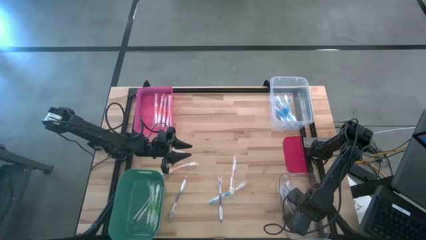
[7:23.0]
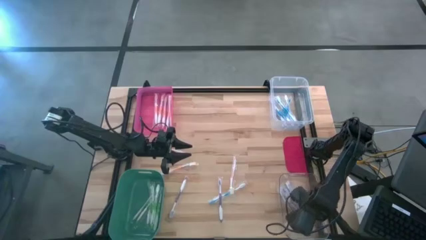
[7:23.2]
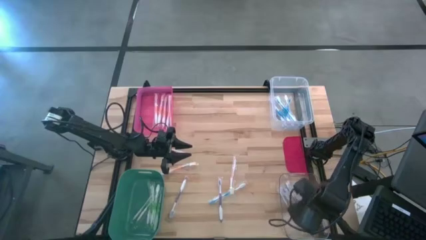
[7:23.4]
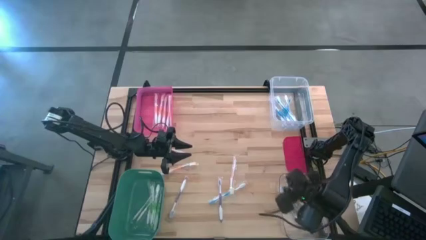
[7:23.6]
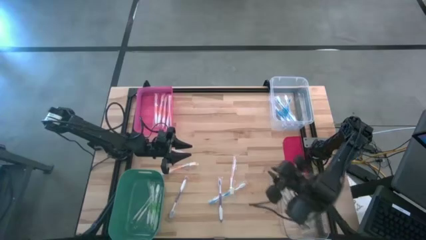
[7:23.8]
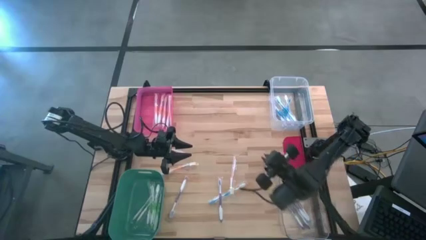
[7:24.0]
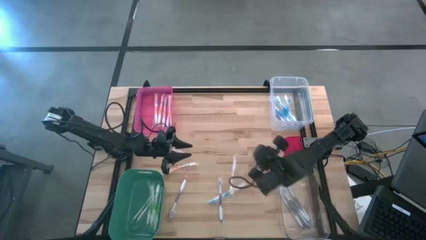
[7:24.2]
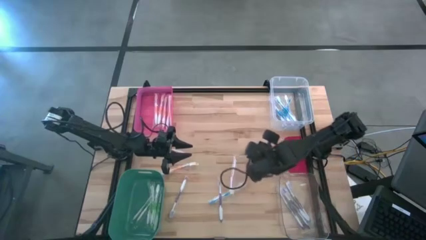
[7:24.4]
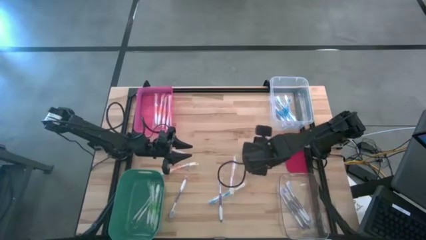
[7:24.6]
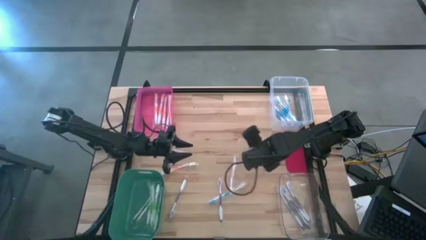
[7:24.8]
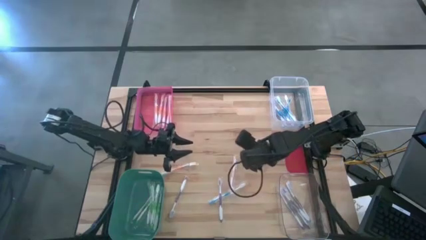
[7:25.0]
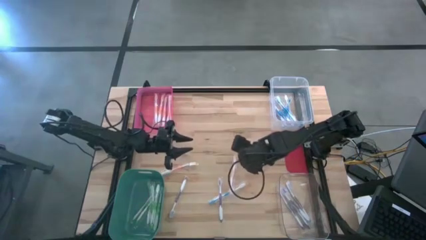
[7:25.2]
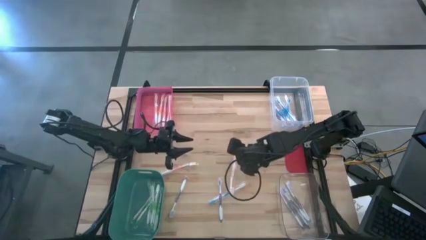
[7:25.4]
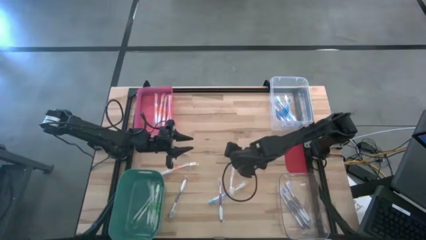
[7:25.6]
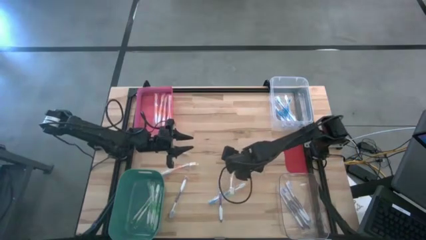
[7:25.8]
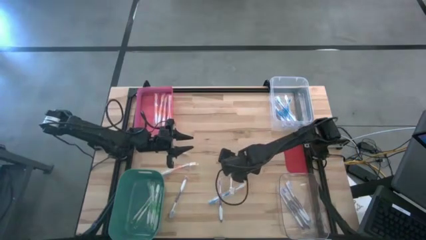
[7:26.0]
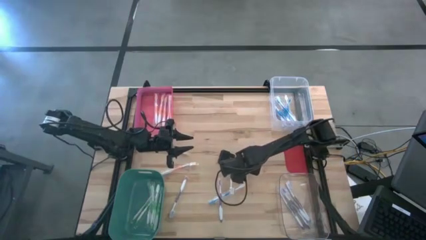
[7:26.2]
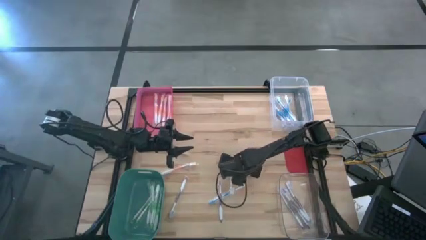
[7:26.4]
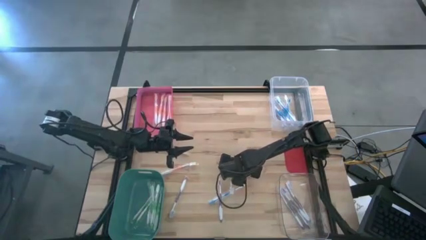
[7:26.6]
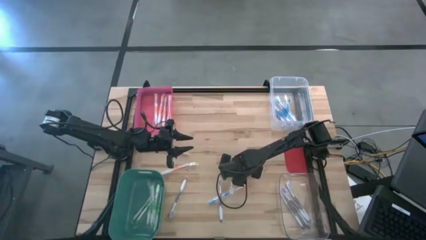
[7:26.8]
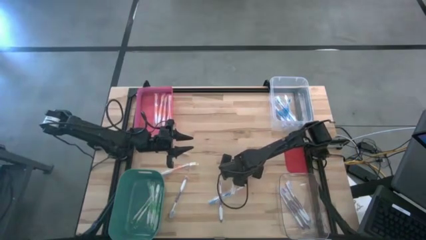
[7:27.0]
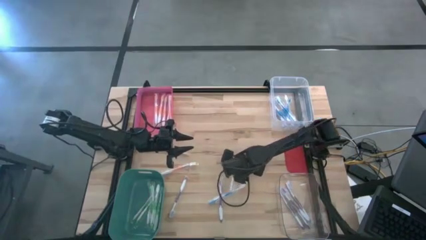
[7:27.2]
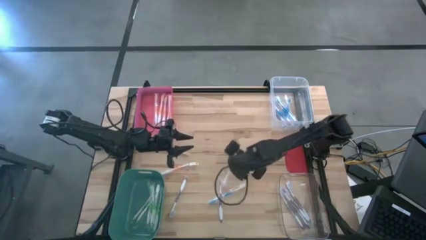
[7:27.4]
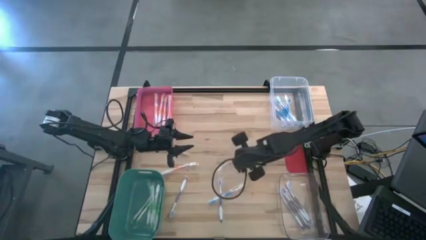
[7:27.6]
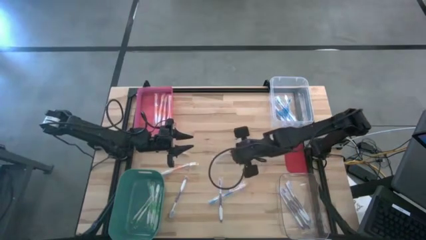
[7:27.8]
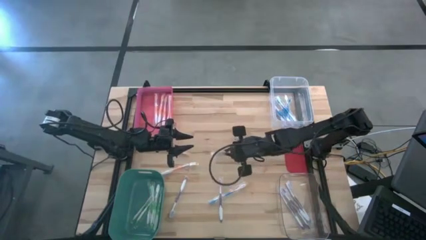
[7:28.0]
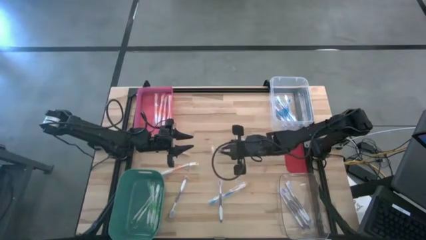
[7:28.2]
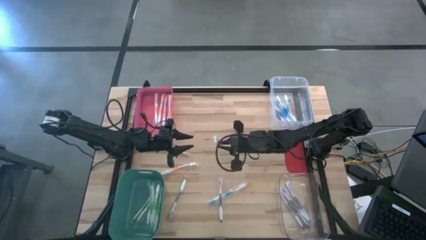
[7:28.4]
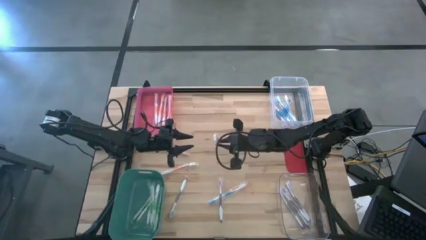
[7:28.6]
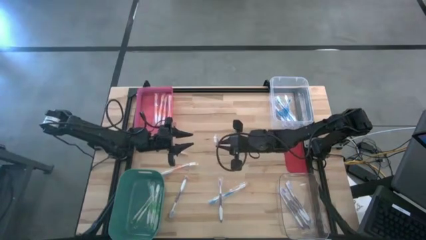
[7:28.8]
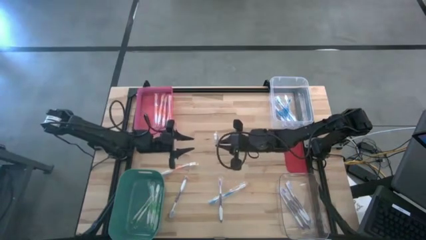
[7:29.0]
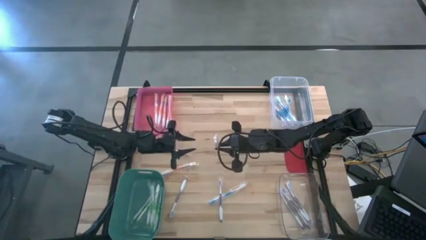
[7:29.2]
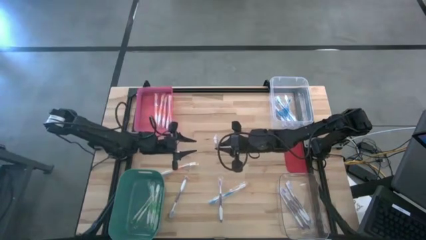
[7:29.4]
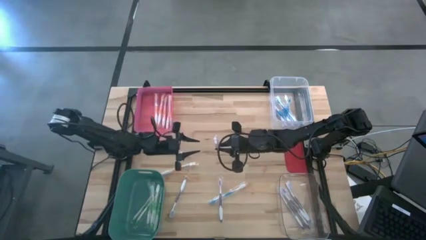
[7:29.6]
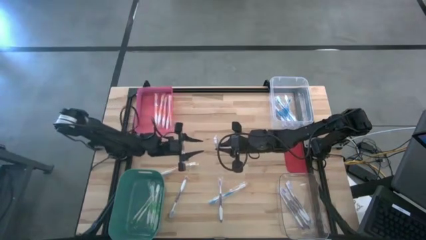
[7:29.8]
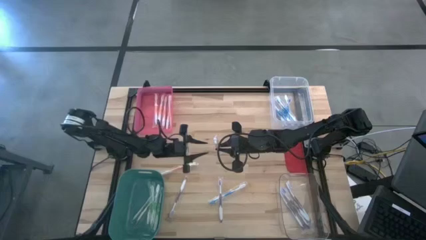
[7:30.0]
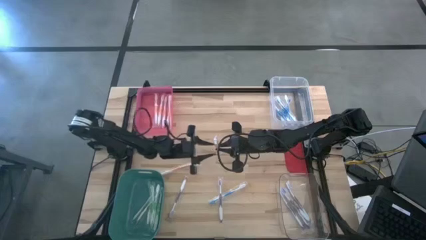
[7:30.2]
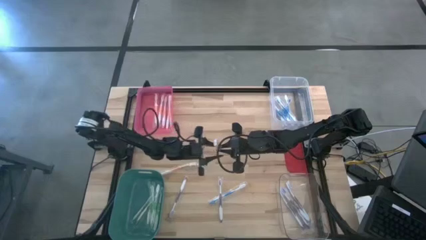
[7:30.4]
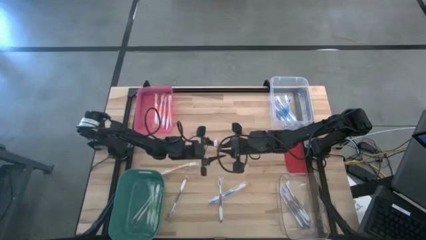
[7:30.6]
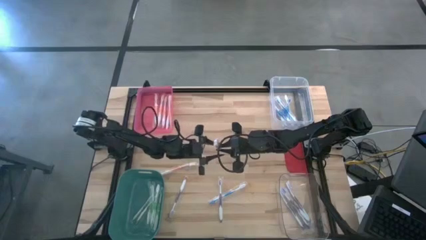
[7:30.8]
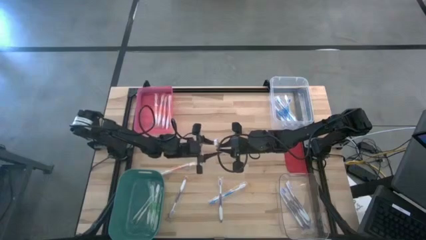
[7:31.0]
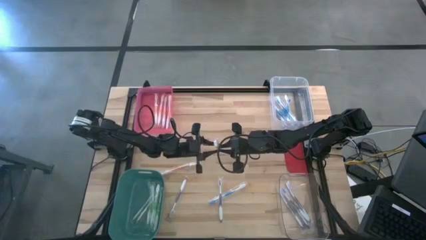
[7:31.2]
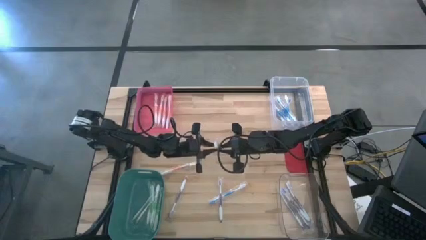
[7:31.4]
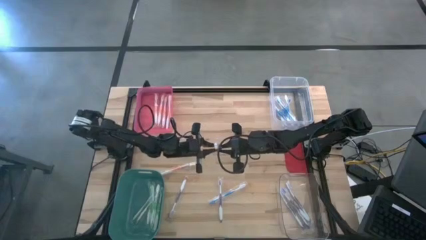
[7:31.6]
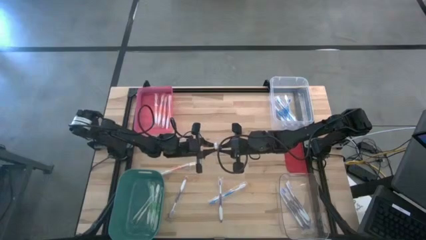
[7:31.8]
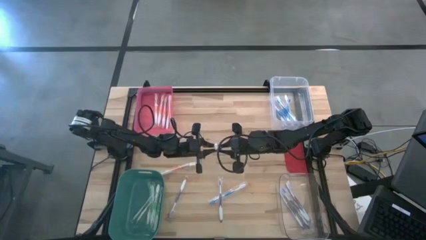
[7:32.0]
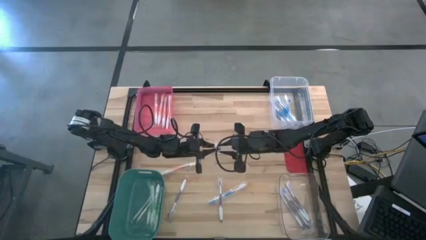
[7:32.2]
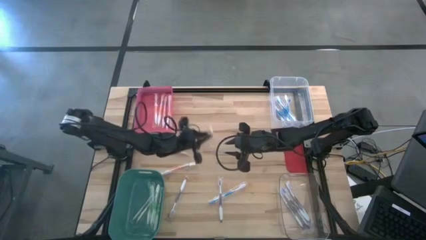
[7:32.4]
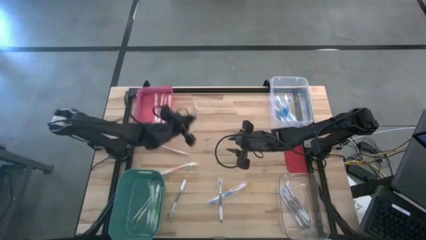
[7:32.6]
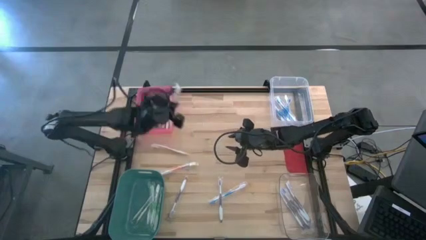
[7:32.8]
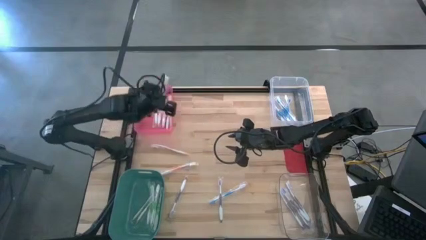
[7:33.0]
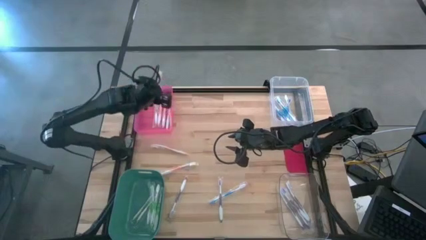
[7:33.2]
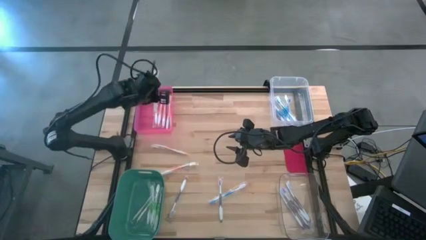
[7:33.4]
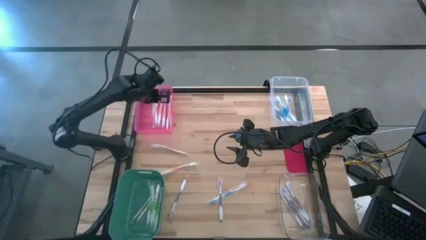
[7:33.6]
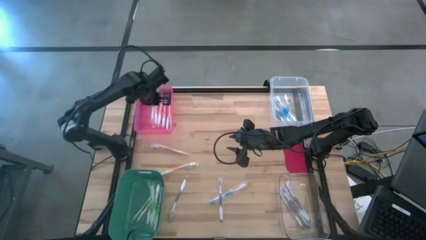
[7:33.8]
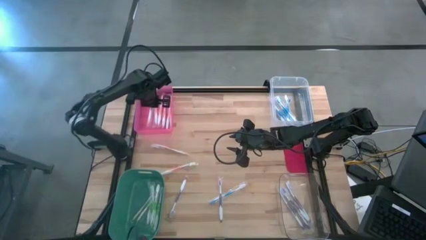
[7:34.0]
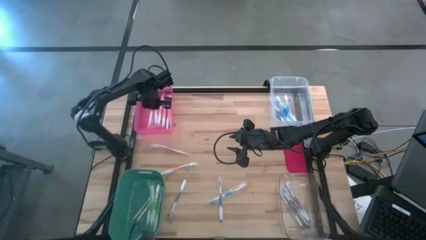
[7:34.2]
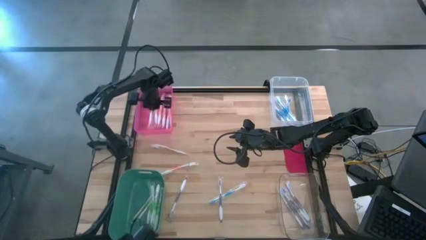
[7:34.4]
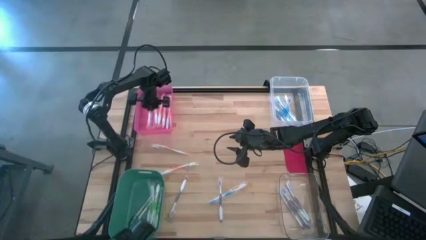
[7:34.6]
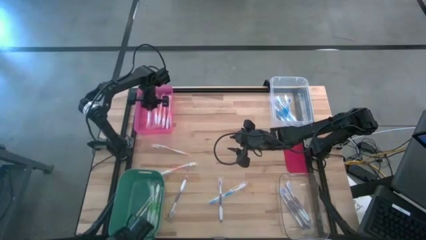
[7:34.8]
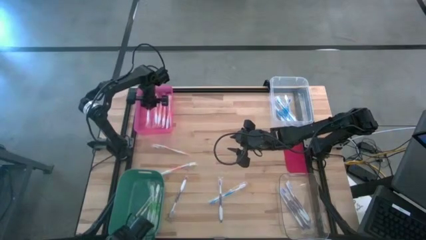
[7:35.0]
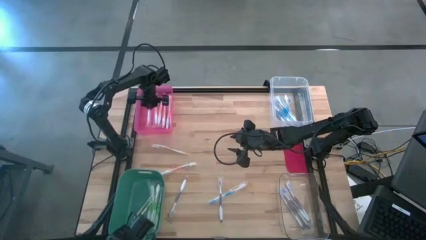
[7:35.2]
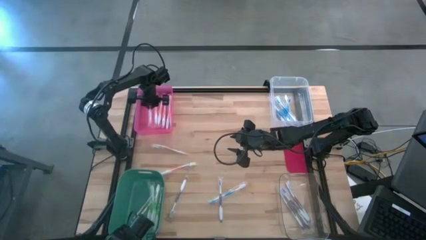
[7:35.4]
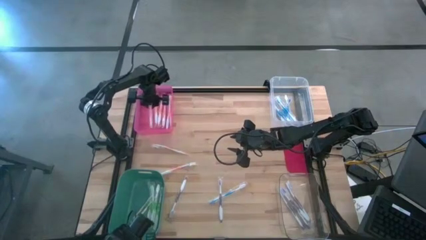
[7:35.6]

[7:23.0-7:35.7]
Task: Pick & Place Toothbrushes
Put the orange toothbrush into the pink bin

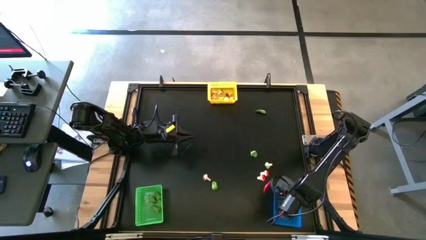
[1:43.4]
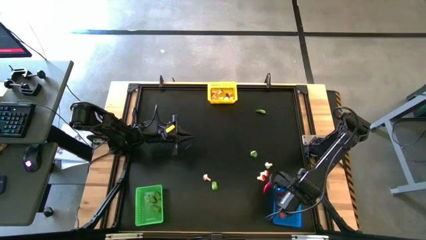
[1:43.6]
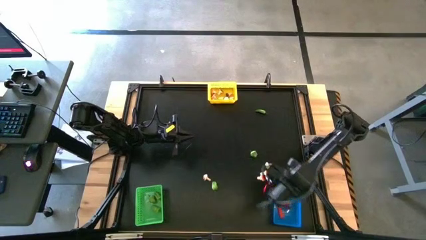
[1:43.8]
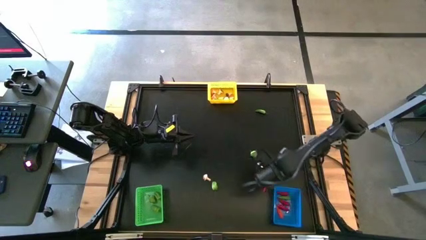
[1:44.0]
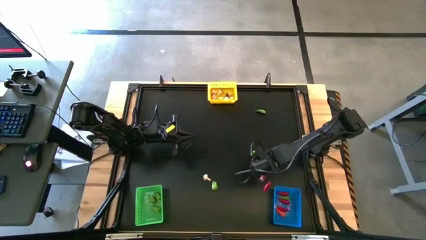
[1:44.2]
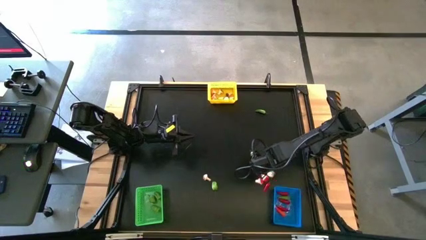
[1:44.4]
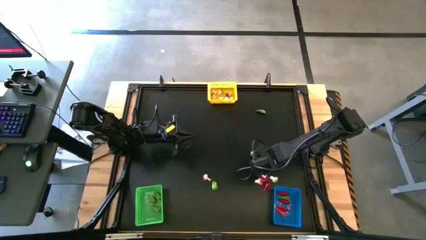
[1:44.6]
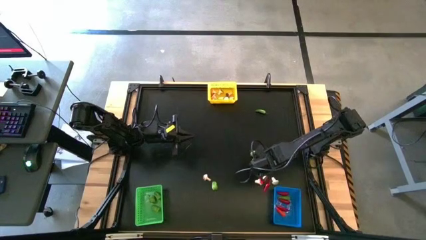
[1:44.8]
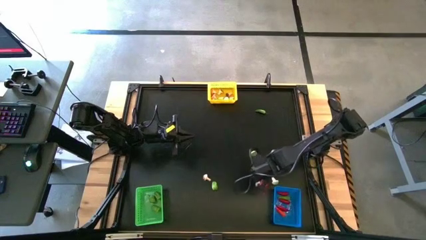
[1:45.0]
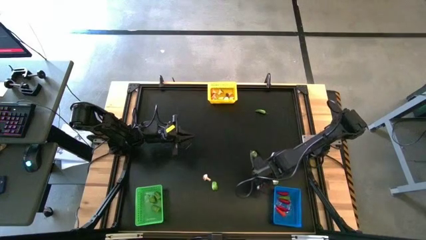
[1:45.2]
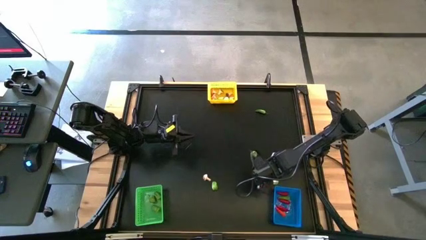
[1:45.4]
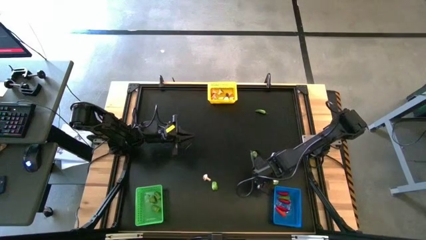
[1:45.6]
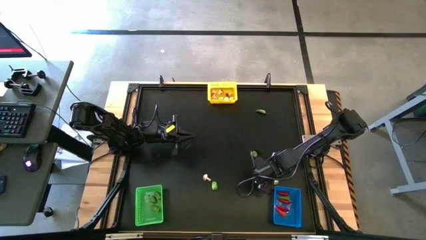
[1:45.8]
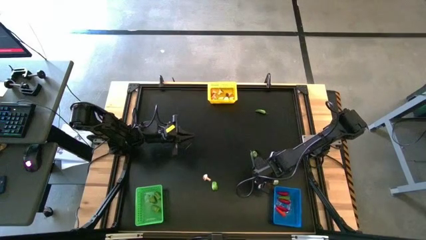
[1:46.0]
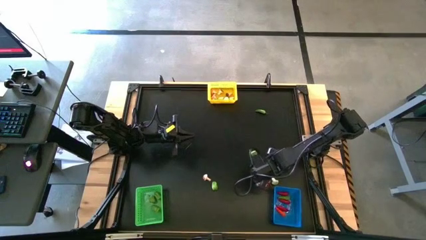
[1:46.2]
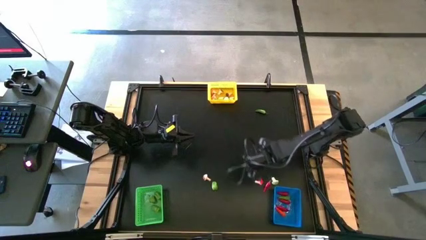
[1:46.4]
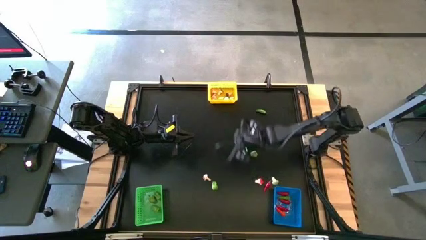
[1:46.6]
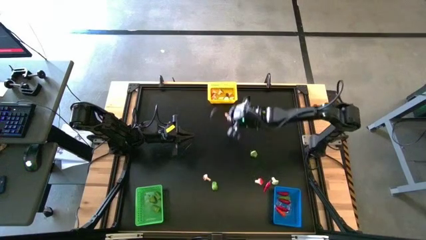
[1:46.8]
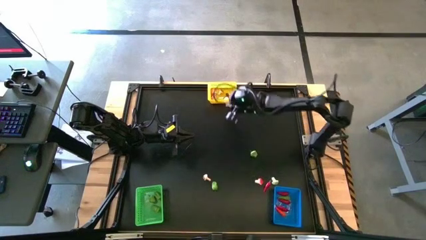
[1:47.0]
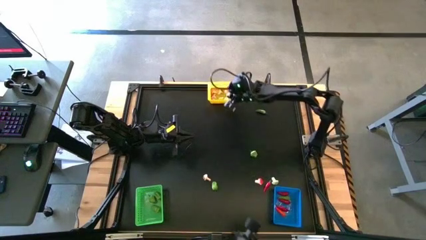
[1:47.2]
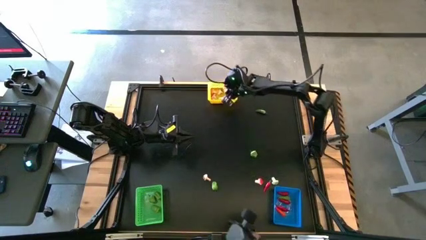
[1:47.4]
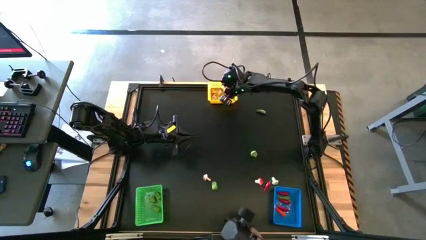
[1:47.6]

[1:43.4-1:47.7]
Task: Sort produce into baskets
Put the right brown mushroom into the yellow bin
